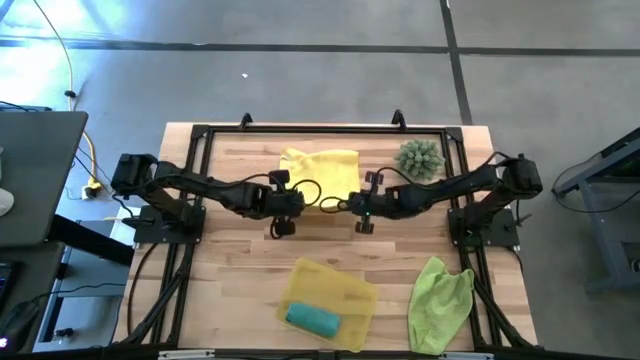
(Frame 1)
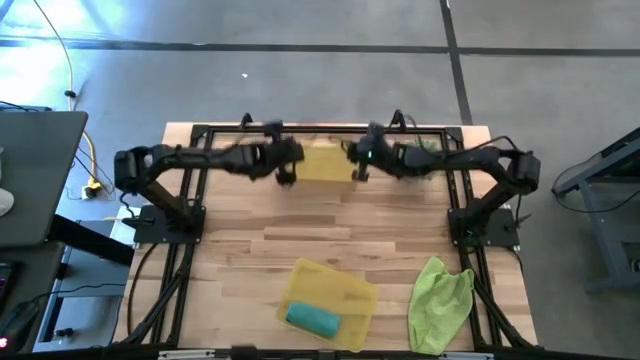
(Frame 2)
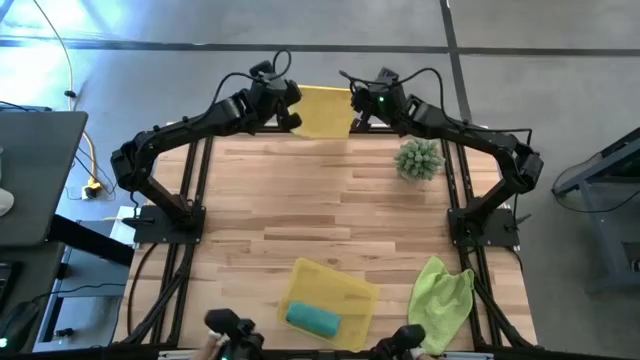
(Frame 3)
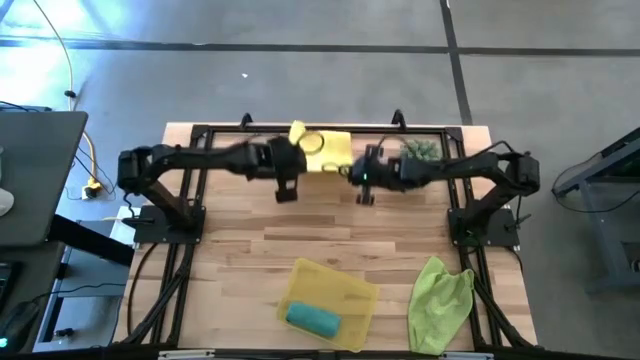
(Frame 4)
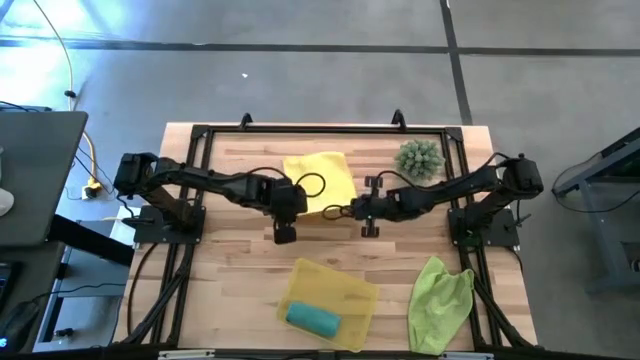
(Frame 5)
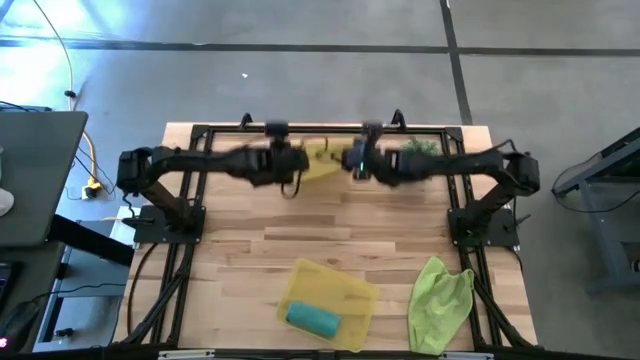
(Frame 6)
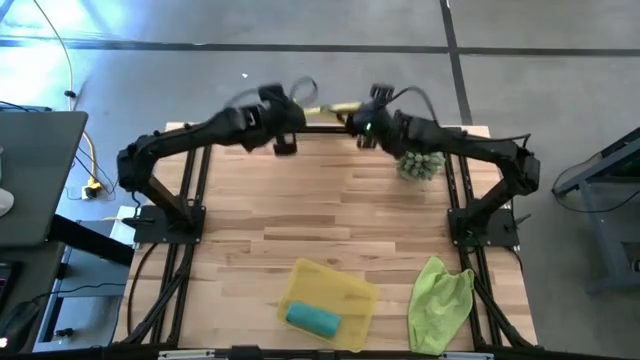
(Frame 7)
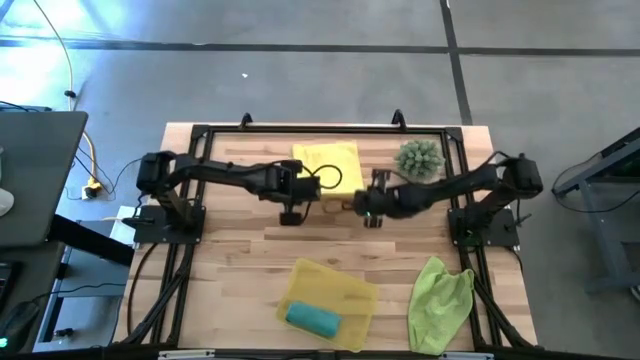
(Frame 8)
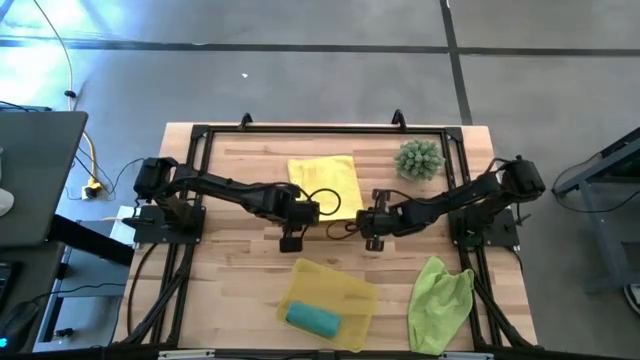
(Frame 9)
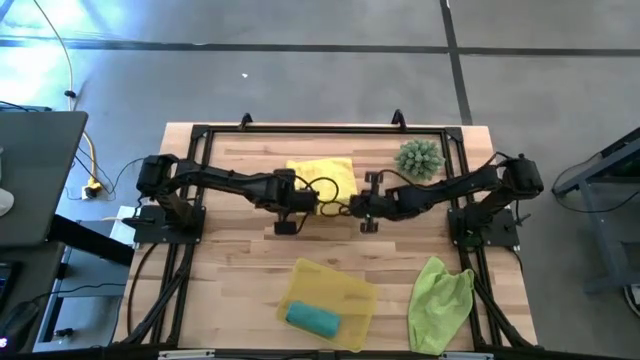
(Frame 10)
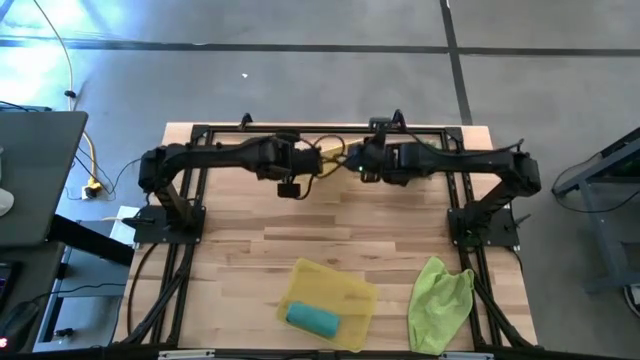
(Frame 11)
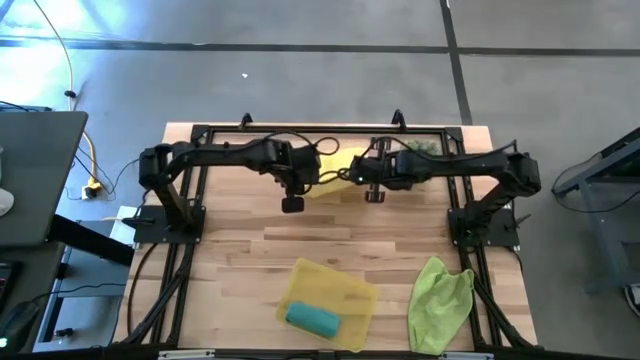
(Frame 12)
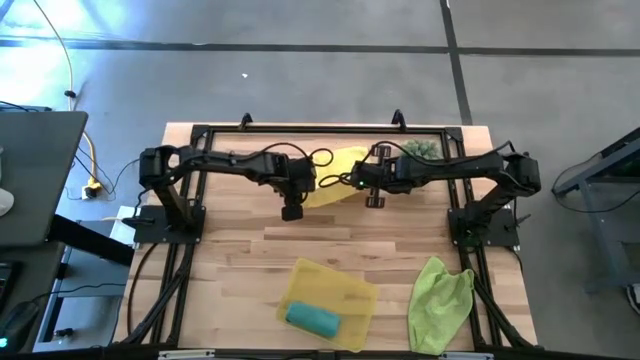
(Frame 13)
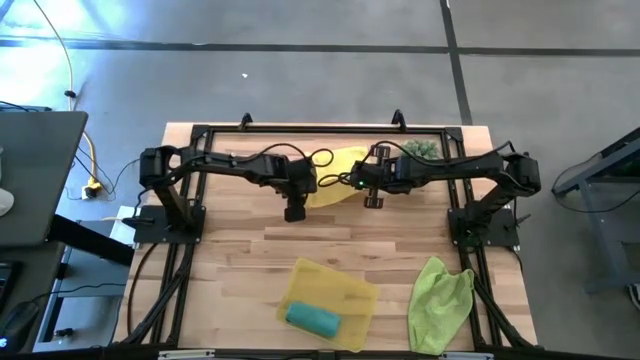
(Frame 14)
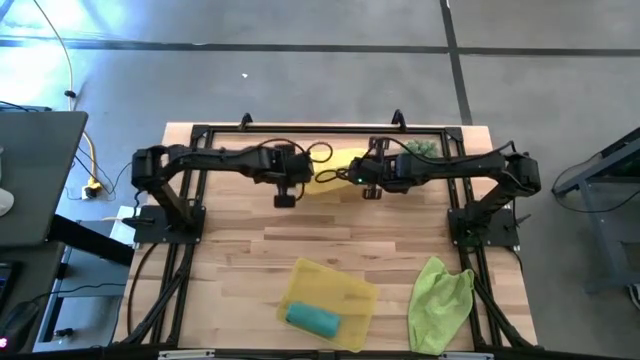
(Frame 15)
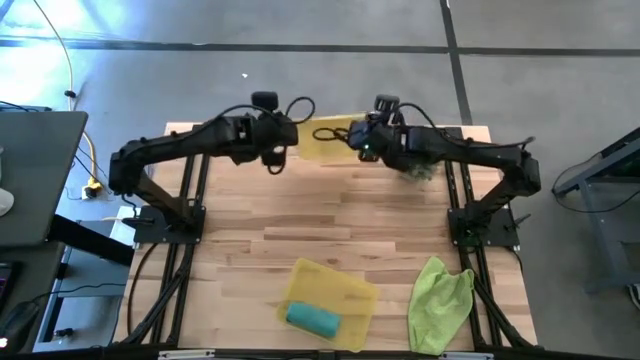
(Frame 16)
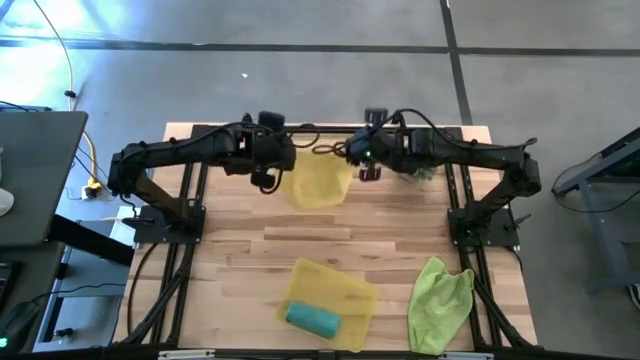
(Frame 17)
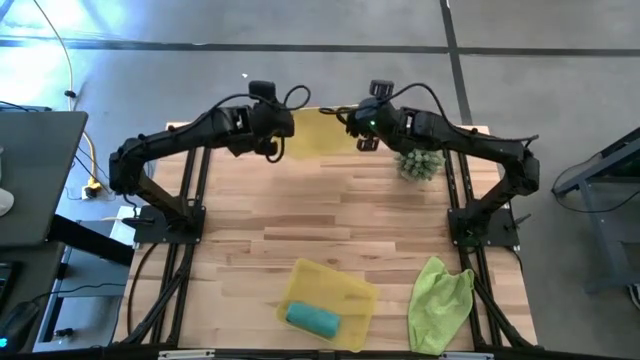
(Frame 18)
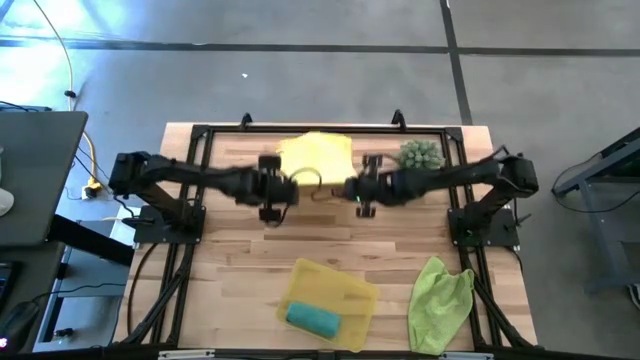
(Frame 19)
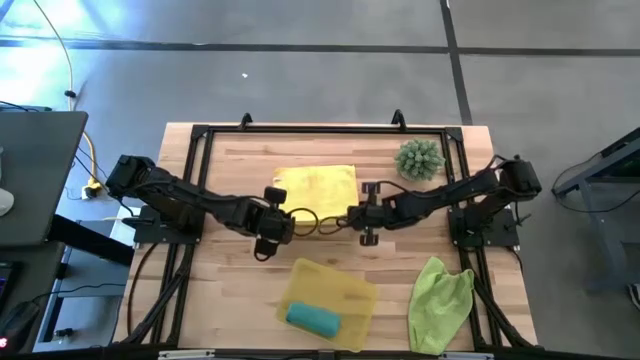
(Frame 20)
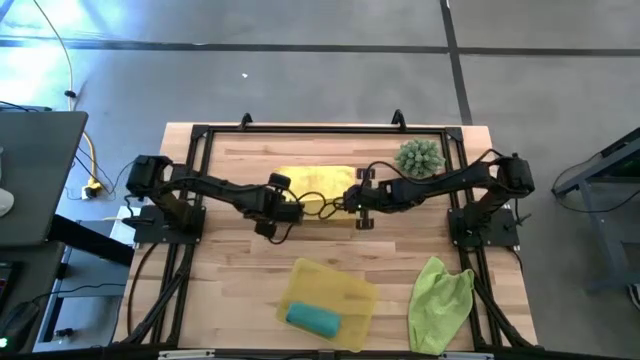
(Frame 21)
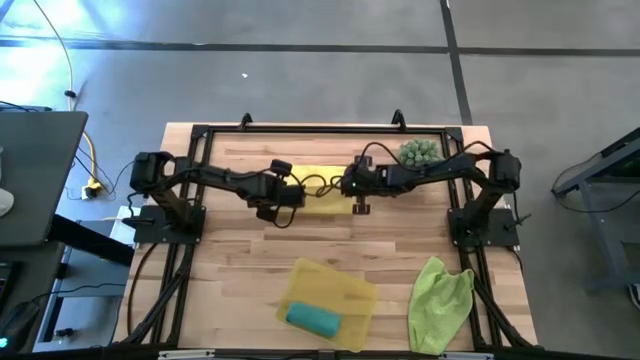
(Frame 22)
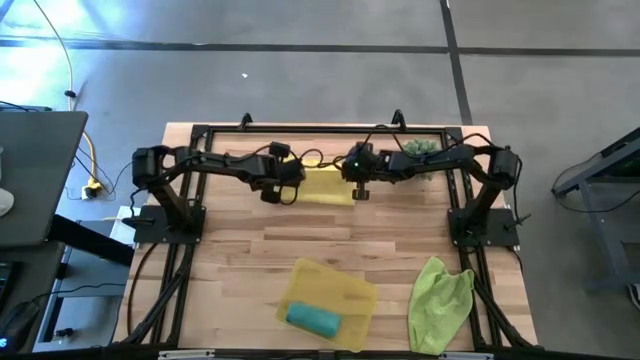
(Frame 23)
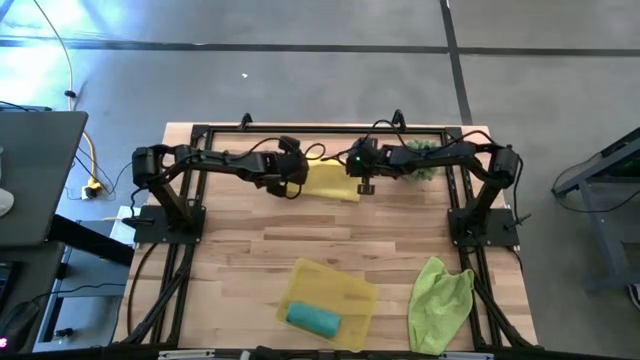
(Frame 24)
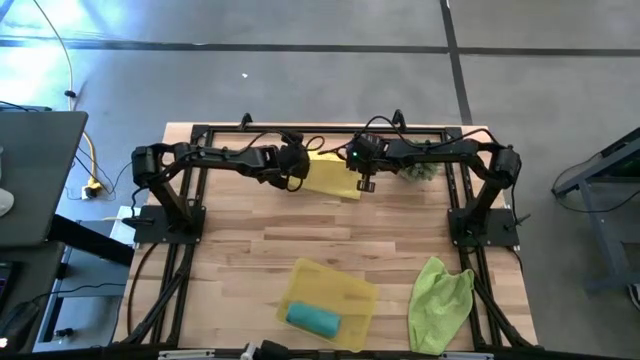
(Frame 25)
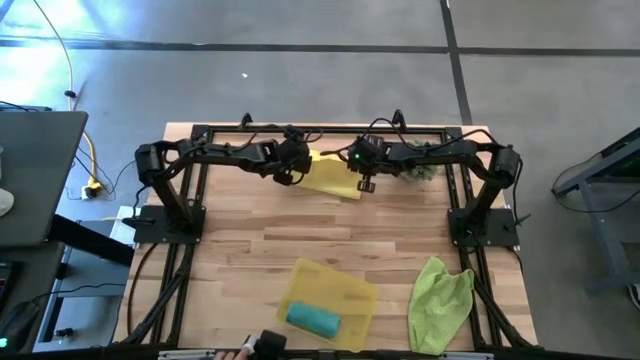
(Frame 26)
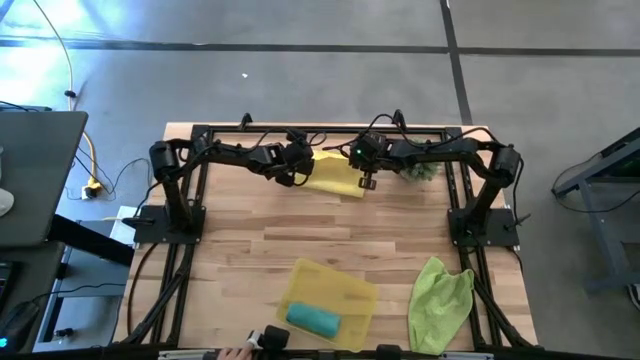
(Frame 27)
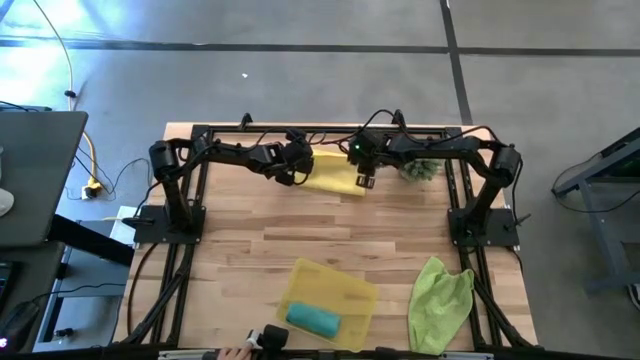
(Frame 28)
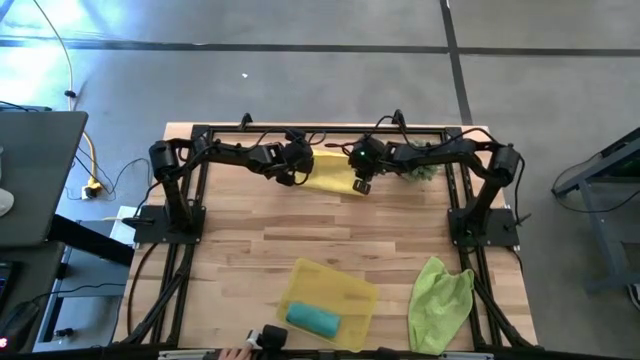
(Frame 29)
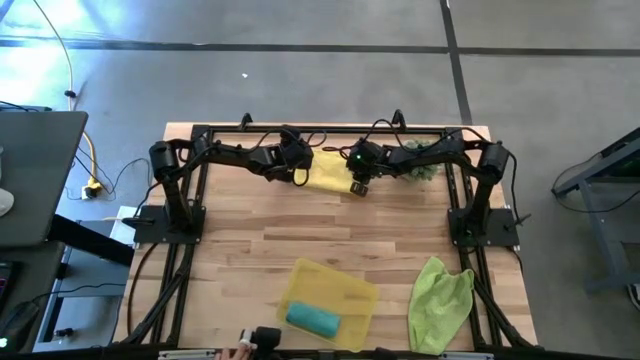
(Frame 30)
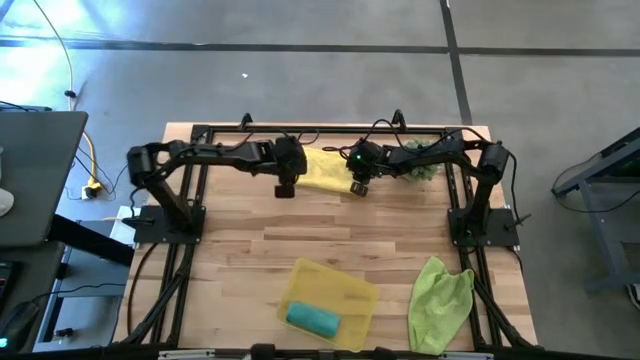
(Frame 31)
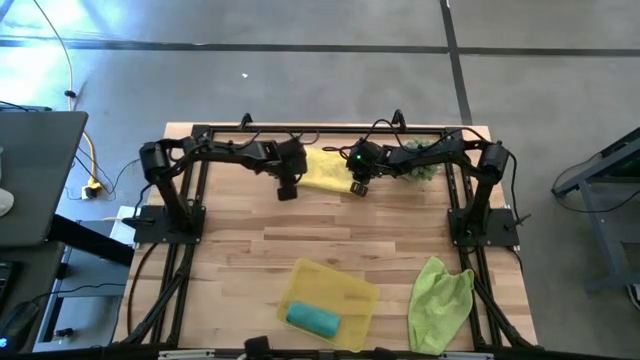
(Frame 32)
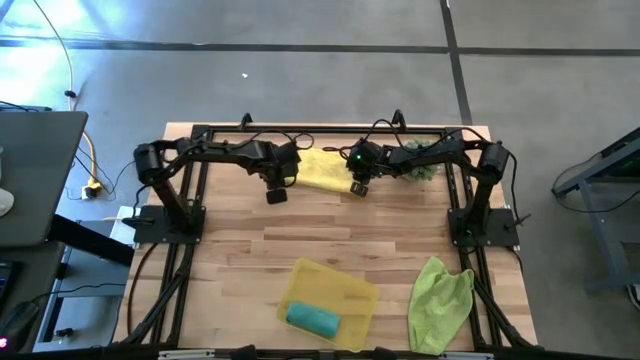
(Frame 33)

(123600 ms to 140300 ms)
Task: Roll microfiber towels into tight, uniform cylinder then place into a basket
Fold the yellow towel

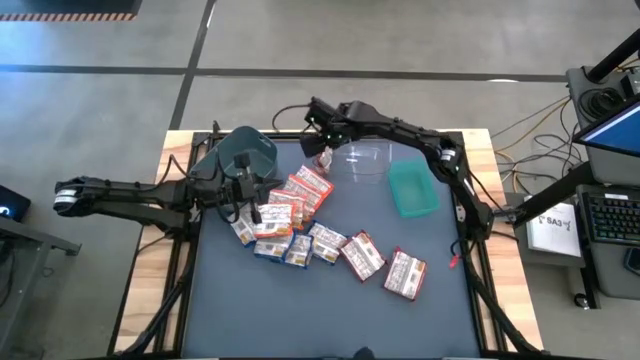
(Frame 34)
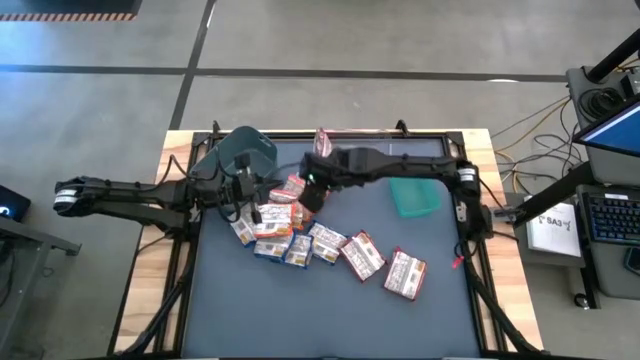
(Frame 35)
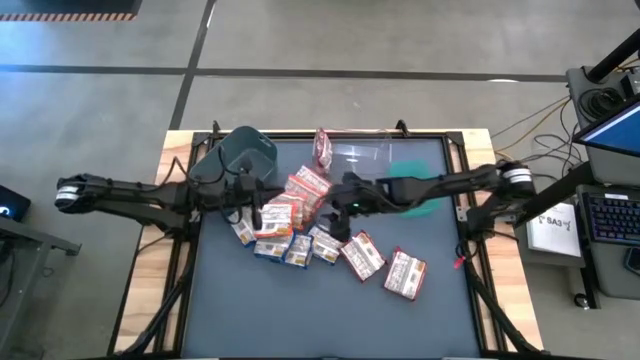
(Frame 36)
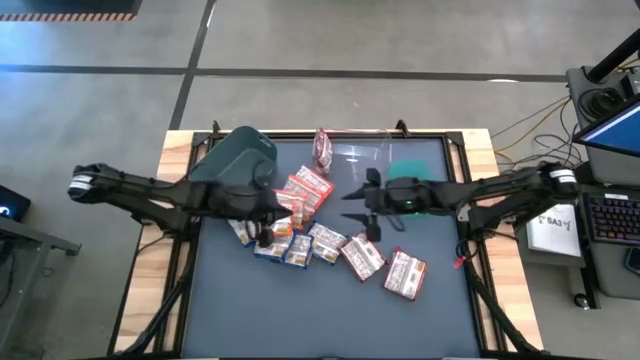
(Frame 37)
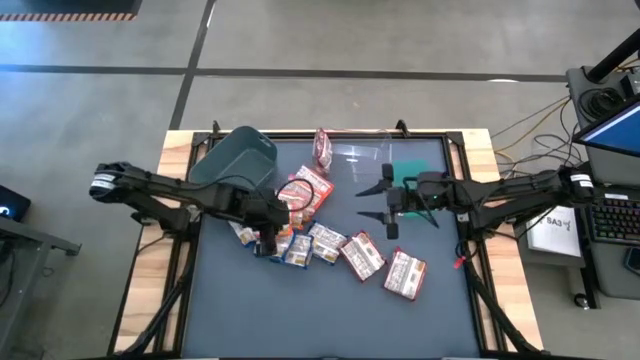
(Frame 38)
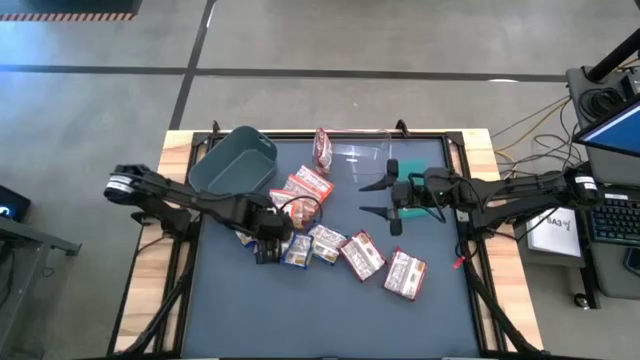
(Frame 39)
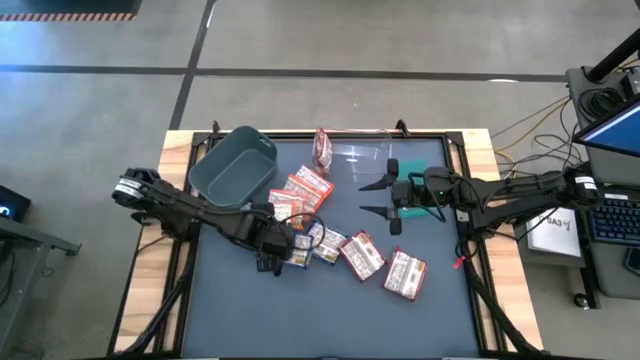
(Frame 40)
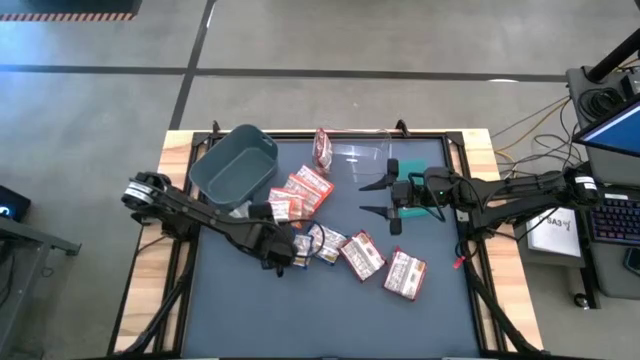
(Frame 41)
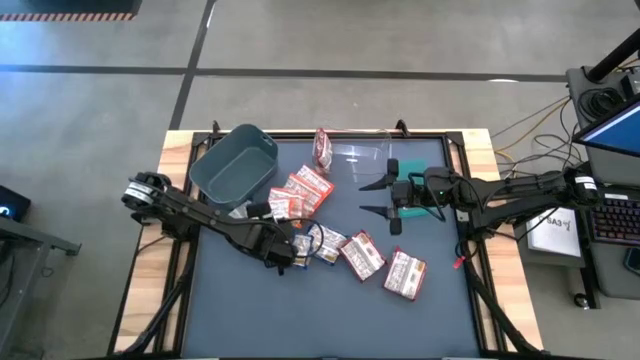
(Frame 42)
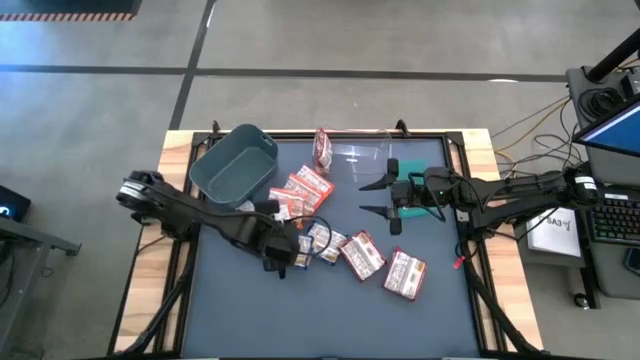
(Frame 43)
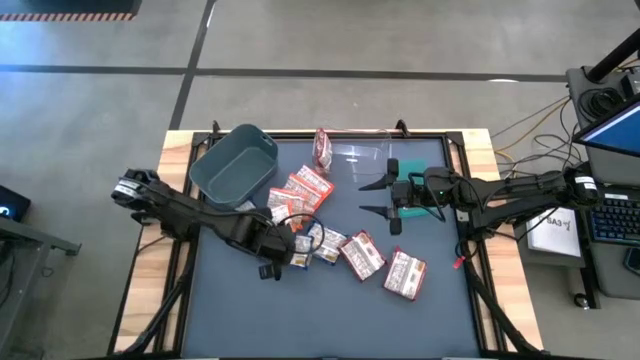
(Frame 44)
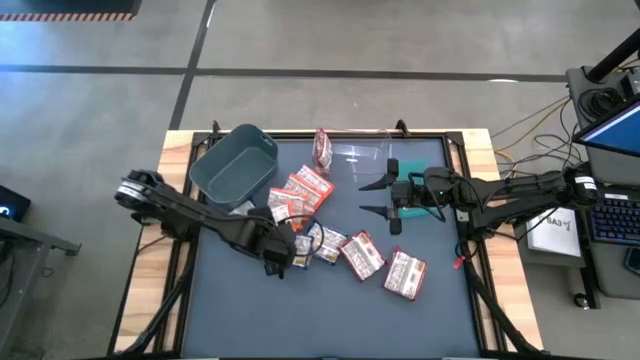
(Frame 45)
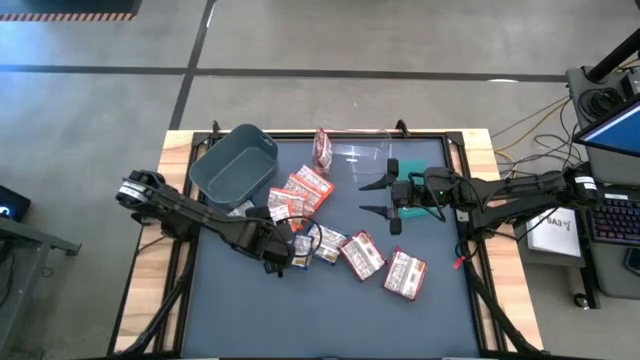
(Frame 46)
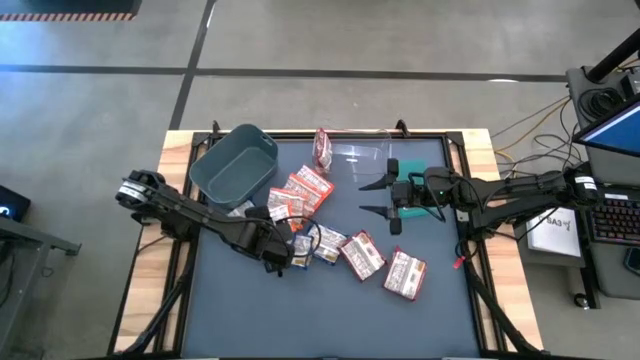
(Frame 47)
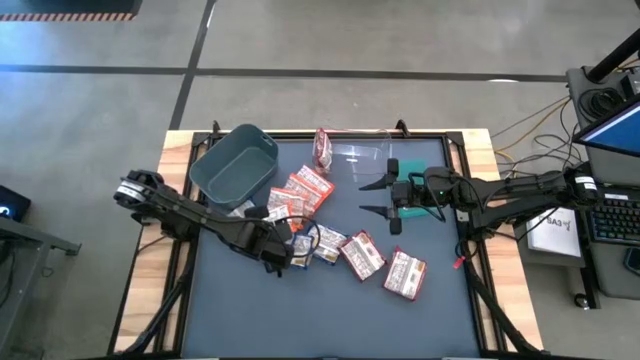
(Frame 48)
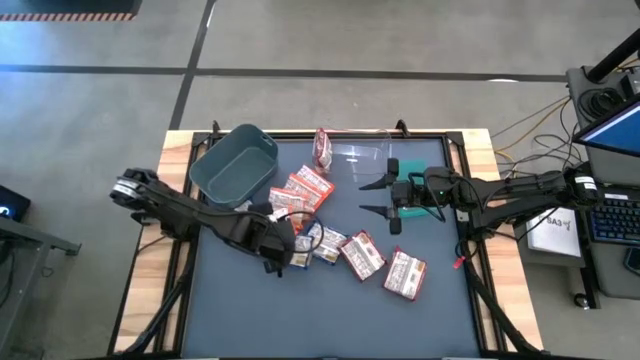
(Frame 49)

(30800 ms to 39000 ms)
Task: Sort Maruchan noodles
Put the orange noodle pack into the gray bin
